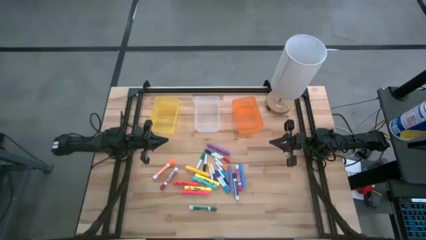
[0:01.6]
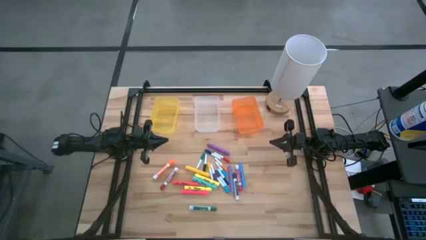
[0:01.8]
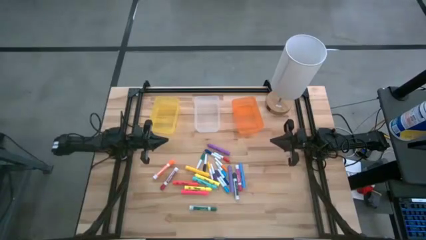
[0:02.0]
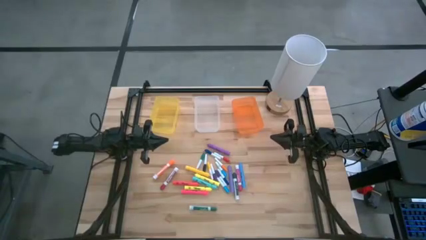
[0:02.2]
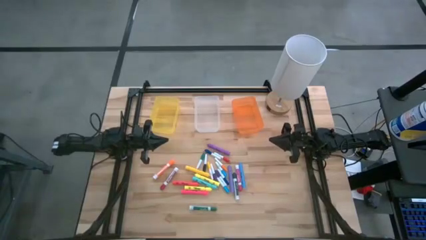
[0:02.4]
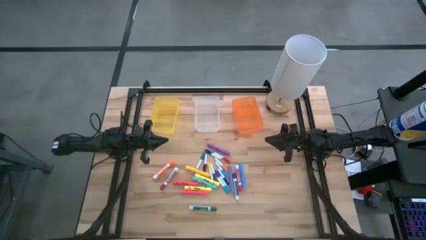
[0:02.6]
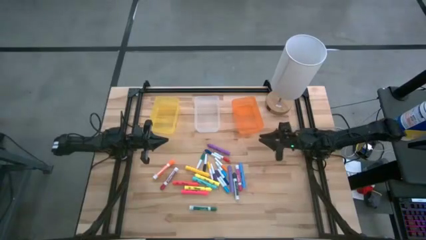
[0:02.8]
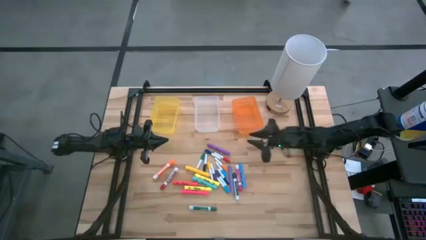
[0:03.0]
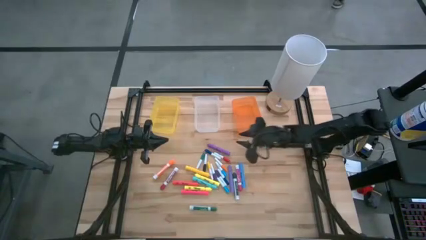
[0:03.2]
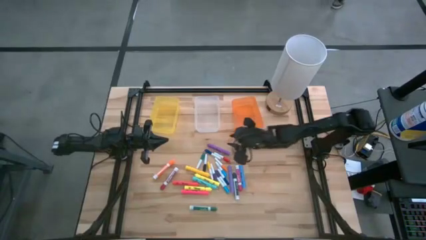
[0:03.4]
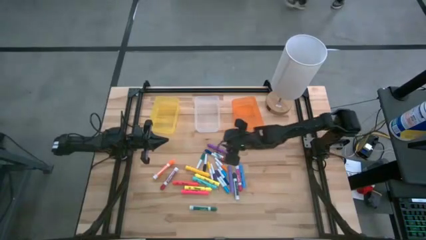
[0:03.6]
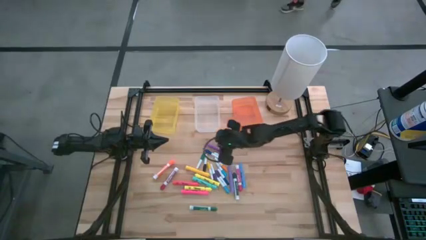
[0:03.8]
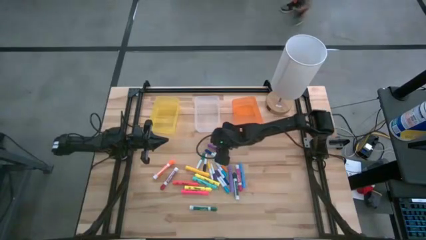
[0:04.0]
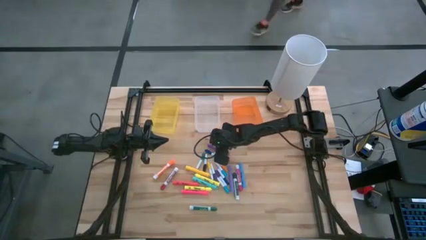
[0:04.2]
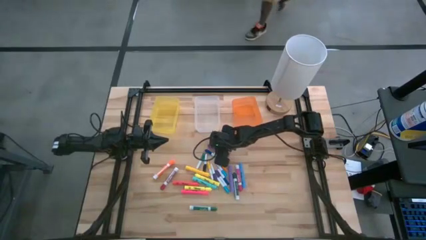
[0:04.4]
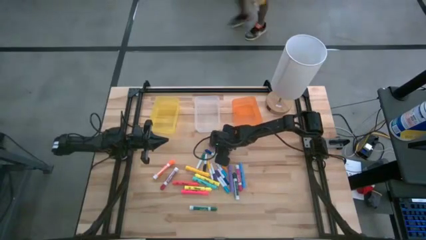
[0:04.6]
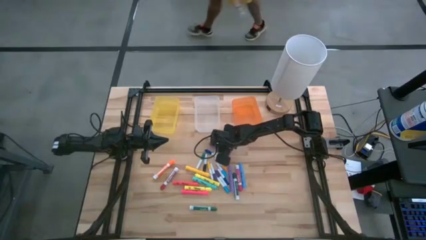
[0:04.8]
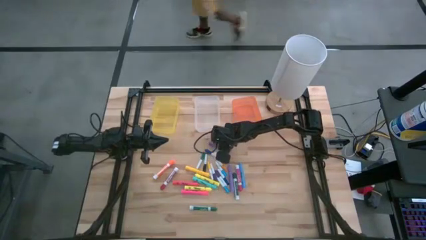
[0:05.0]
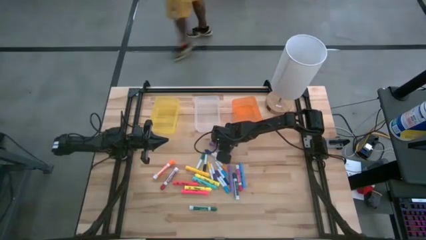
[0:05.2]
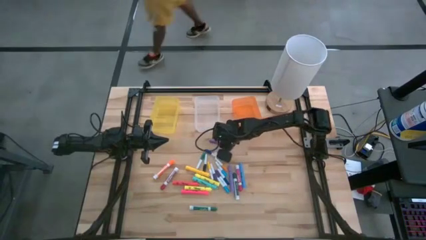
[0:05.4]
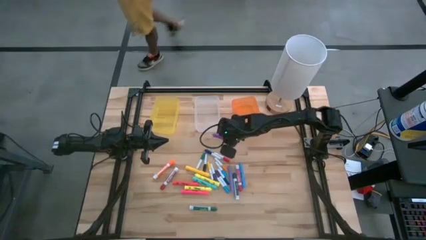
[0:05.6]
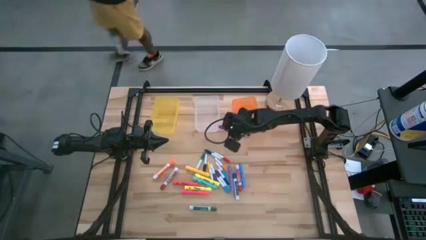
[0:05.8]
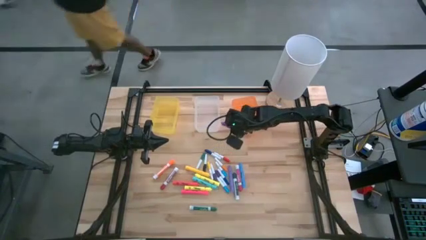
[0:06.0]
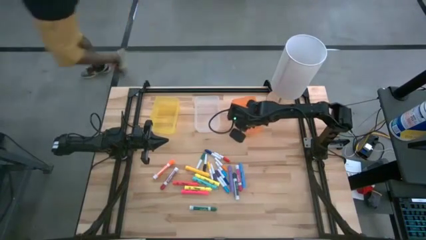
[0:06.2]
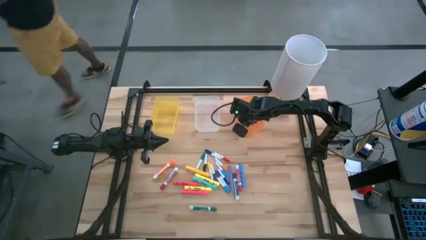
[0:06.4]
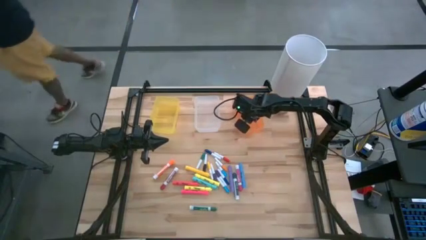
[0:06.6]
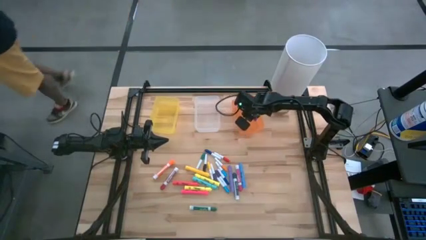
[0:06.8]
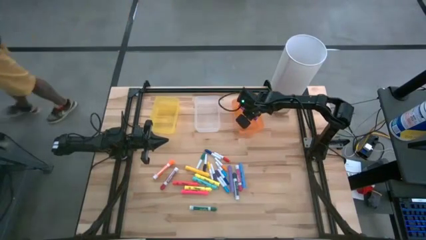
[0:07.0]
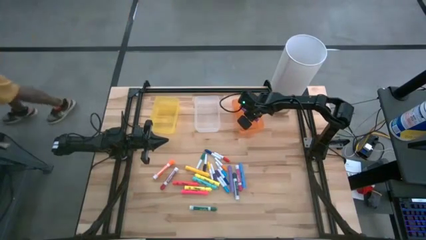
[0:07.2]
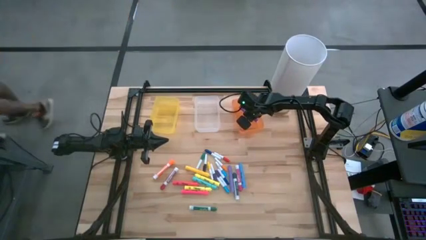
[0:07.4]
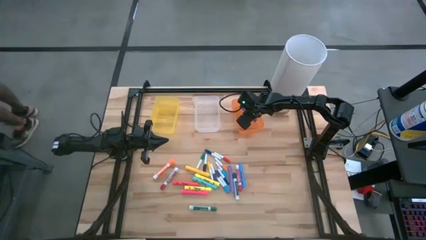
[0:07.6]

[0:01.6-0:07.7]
Task: Pick & Place Markers
Put the large violet highlighter pen into the orange bin

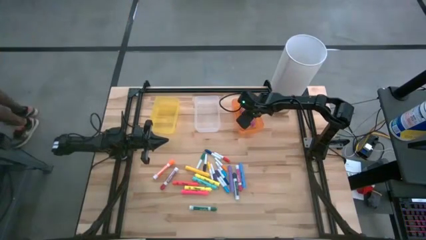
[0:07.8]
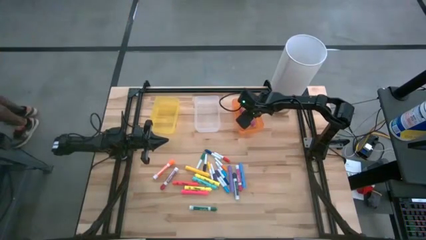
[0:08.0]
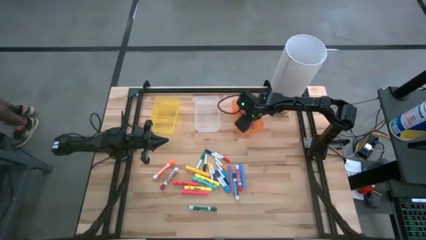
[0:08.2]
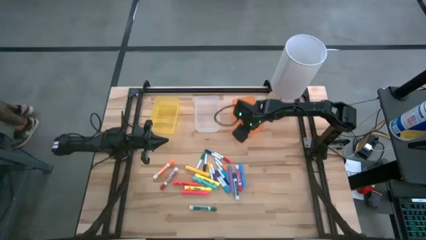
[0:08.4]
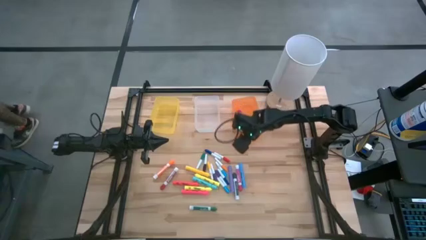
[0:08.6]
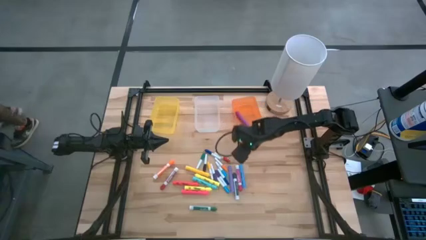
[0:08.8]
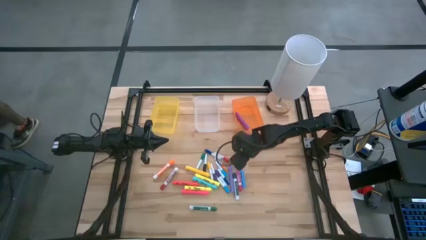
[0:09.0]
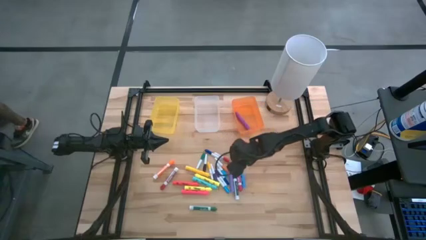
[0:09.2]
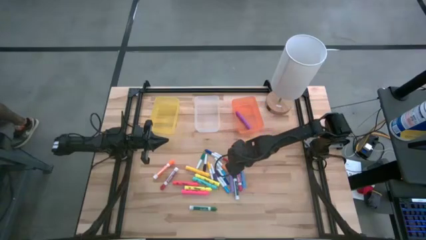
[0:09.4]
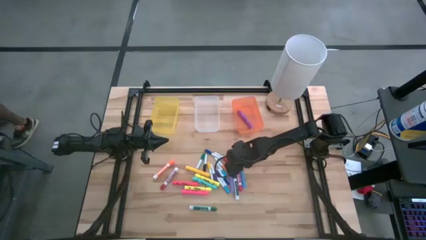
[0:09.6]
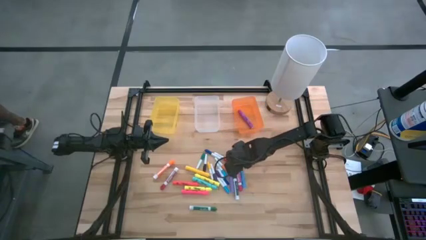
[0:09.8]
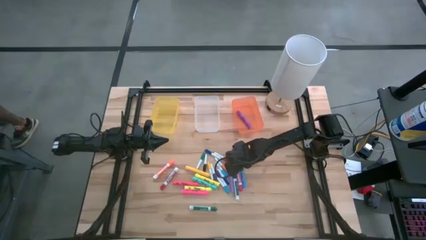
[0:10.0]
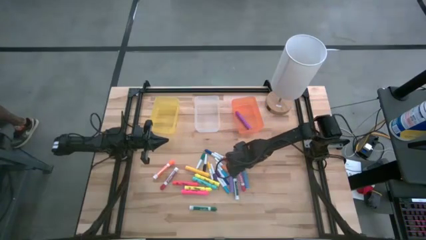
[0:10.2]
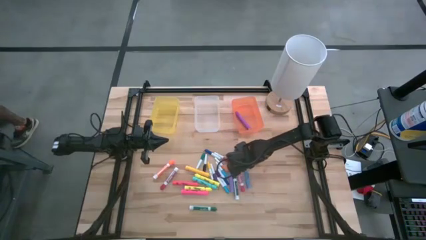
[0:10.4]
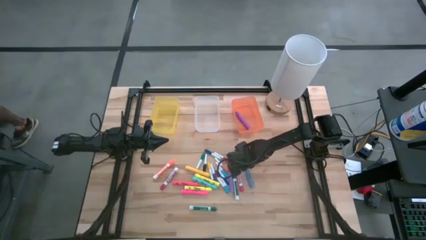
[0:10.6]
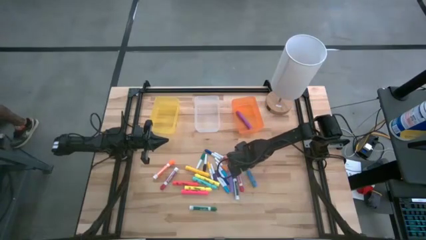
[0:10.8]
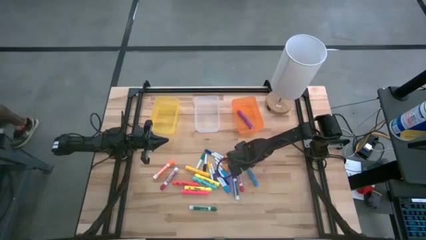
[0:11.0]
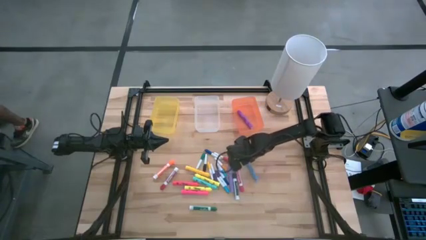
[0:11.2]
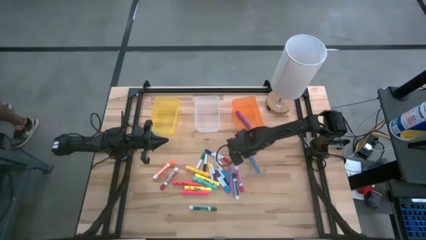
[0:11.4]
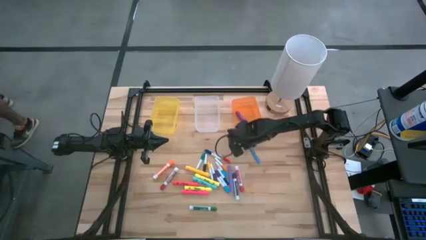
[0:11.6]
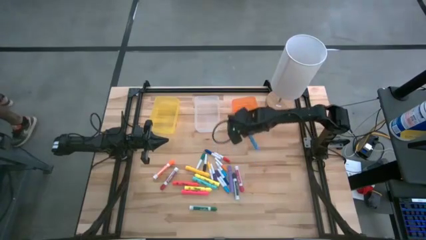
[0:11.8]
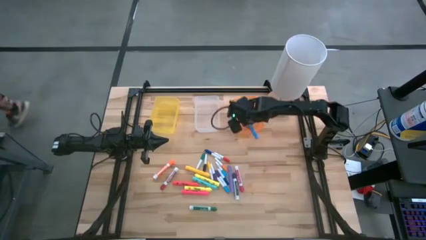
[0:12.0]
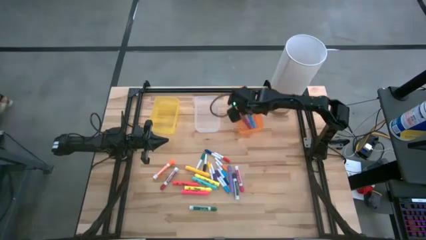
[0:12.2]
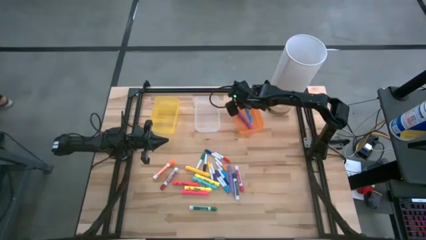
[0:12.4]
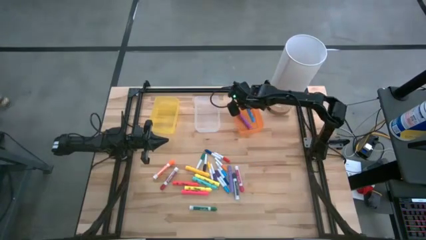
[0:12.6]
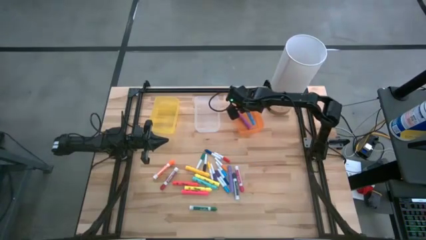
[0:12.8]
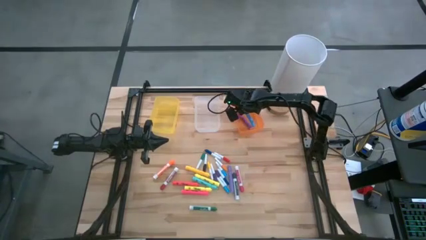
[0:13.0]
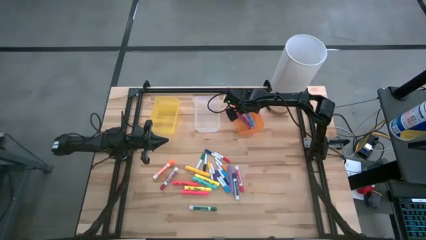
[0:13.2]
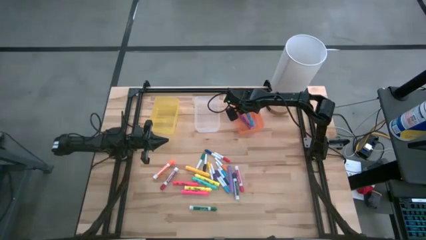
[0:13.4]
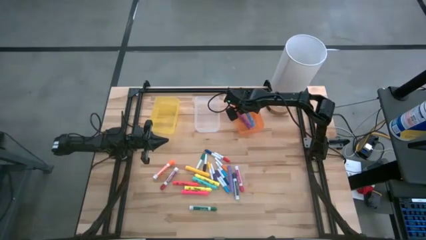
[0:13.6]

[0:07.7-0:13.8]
Put the large blue highlighter pen into the orange bin

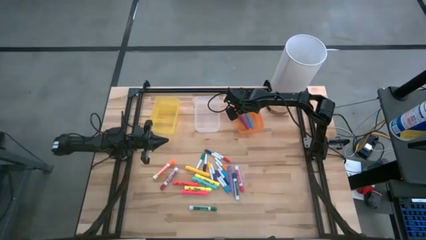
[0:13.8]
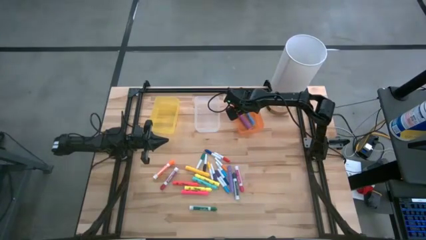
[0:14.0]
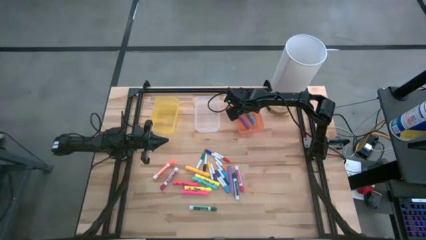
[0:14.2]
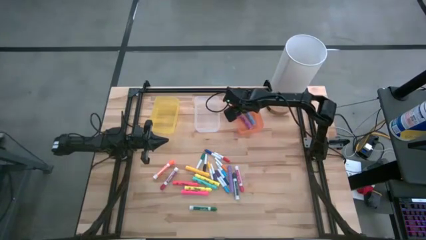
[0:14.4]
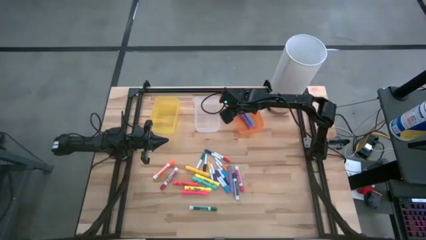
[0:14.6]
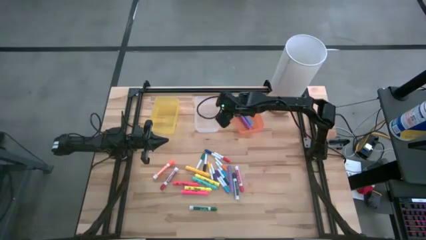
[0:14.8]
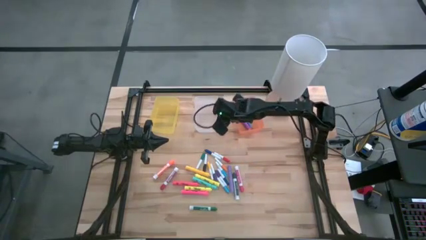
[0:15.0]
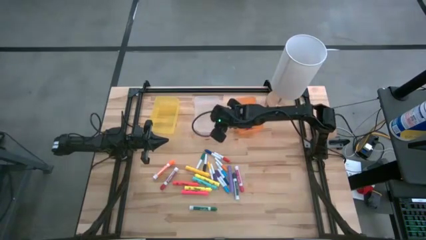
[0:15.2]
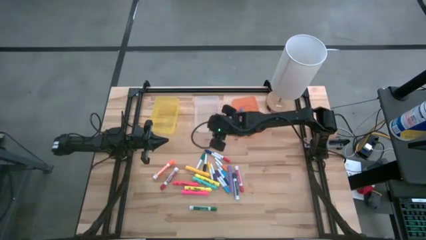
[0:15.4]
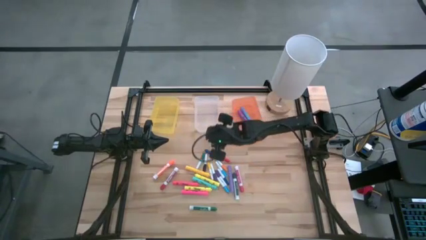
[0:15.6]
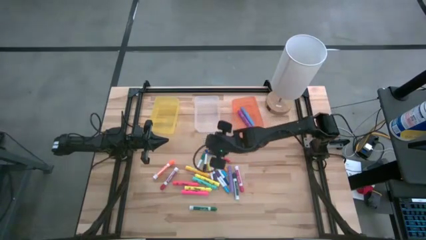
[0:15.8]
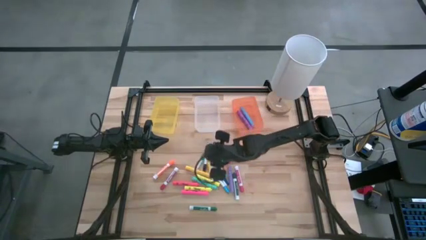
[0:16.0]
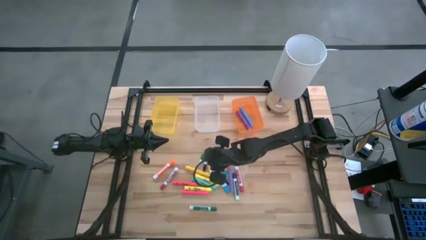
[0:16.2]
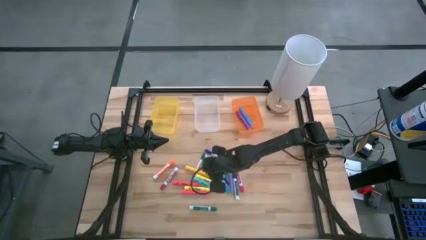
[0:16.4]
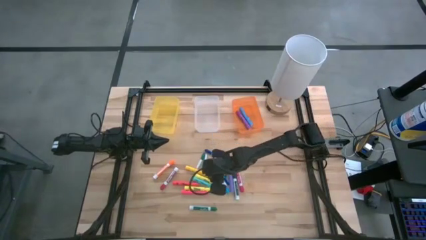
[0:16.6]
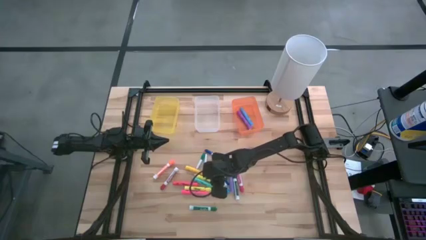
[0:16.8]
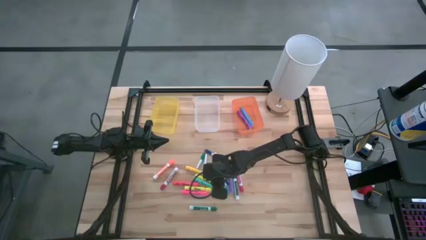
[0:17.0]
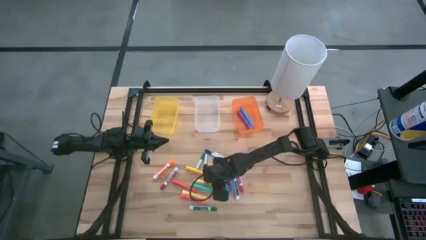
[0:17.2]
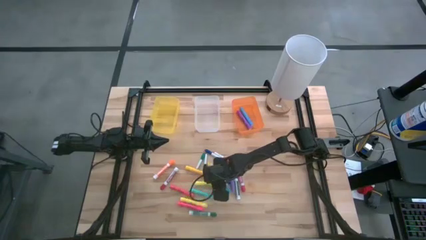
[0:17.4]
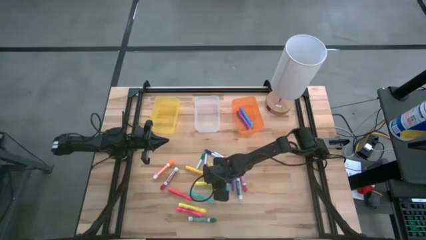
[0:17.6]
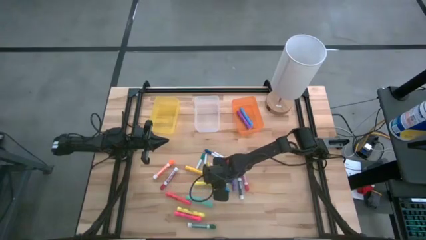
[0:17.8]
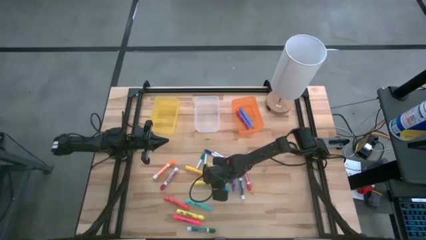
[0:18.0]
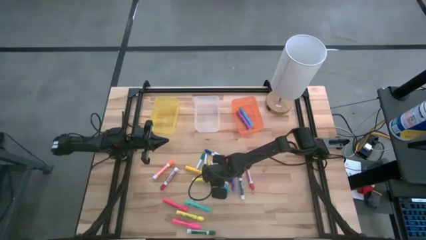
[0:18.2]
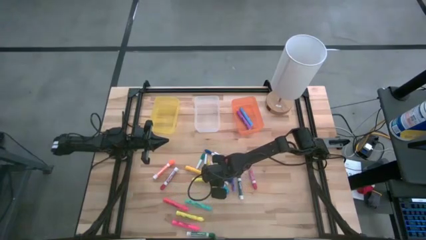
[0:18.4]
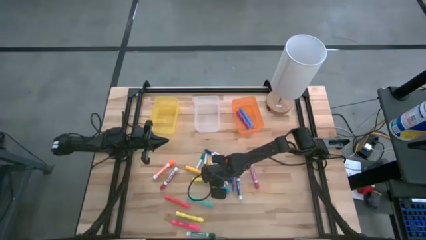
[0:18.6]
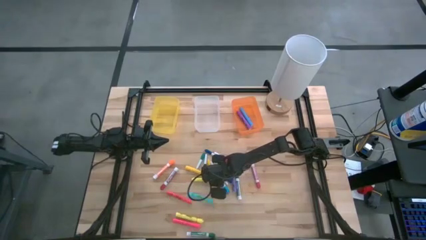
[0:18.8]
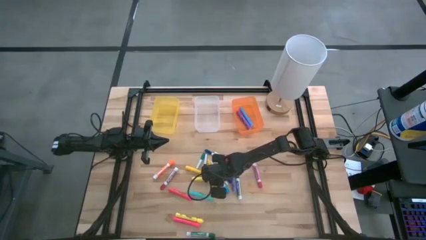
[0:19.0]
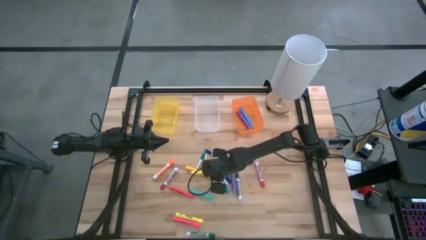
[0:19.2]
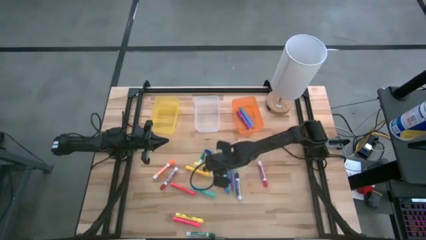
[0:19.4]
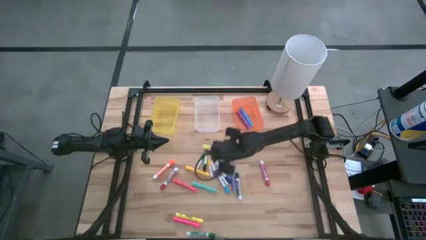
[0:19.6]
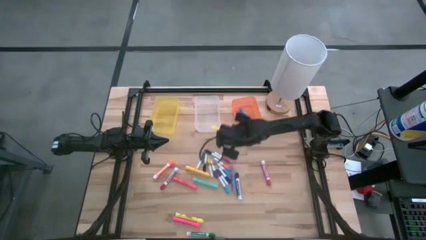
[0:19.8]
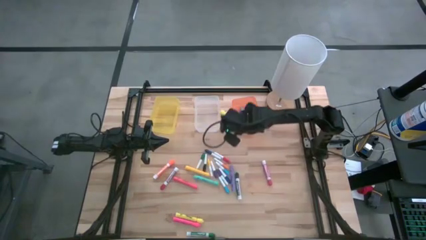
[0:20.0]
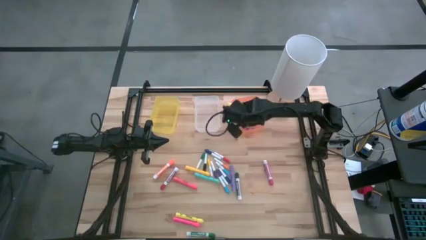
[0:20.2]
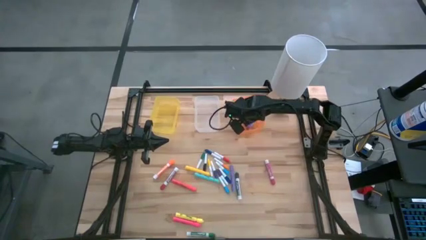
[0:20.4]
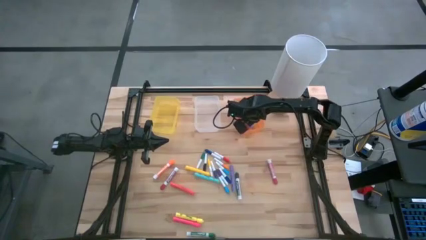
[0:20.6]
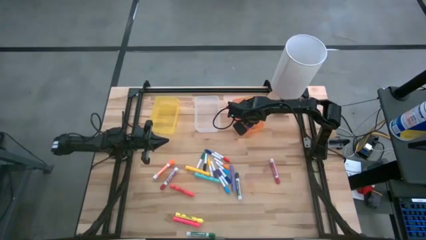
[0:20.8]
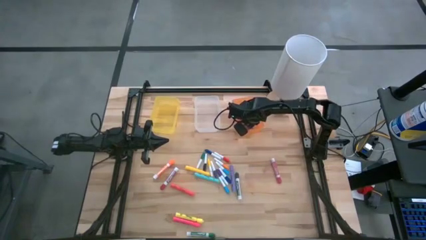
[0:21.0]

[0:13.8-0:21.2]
Put the top large light yellow highlighter pen into the orange bin
